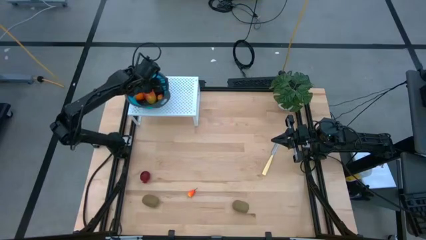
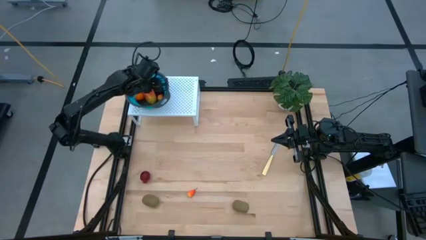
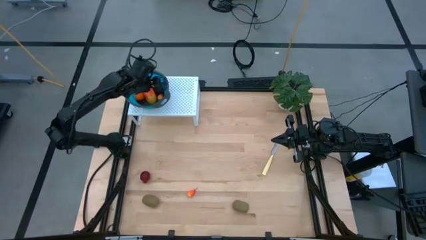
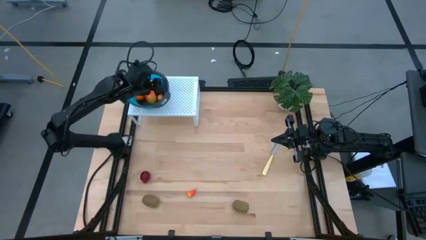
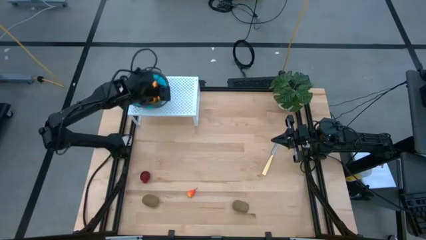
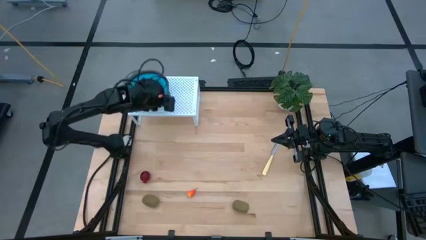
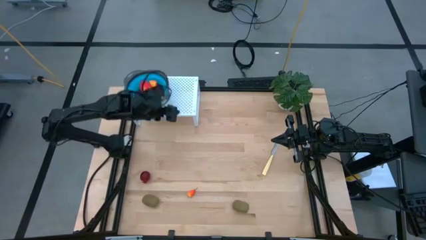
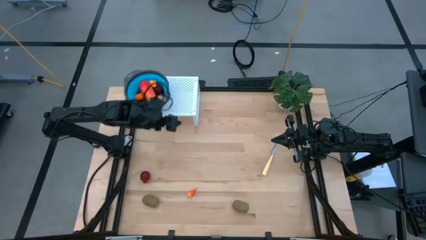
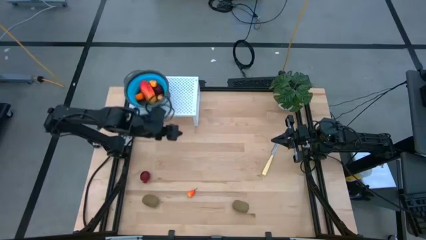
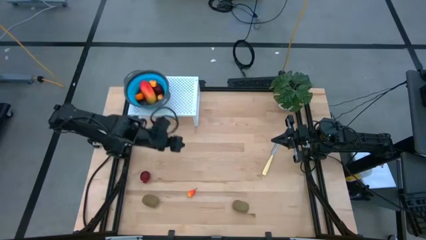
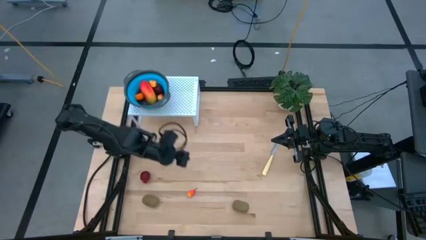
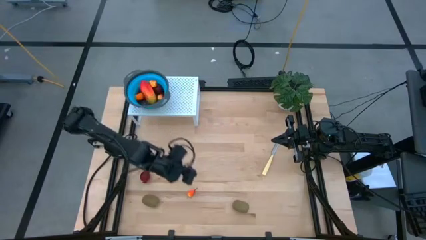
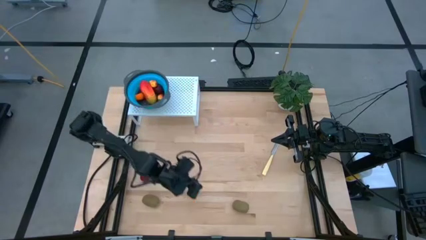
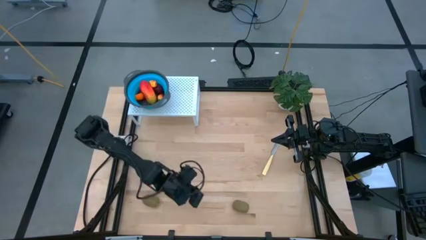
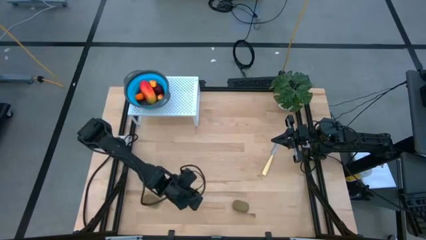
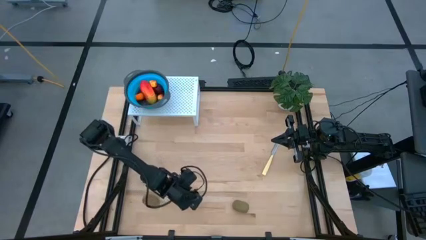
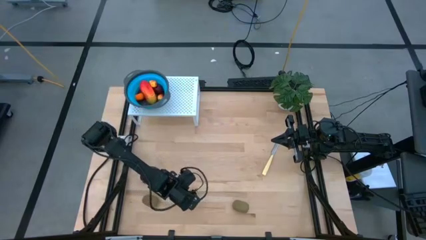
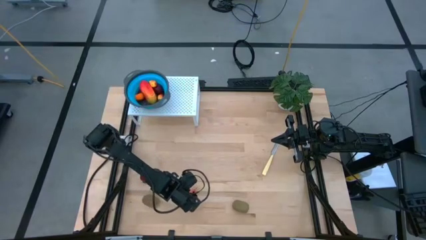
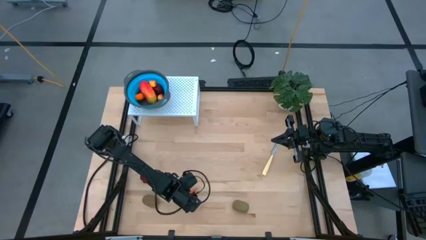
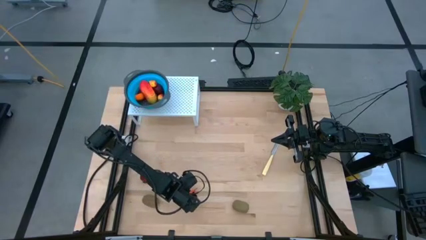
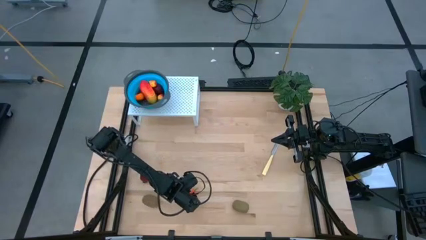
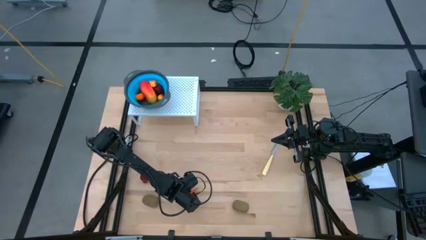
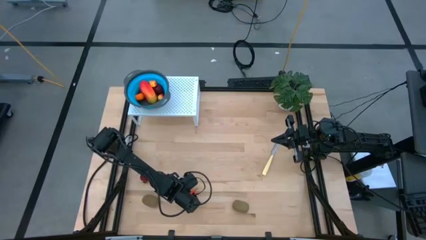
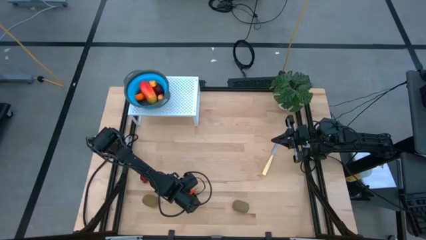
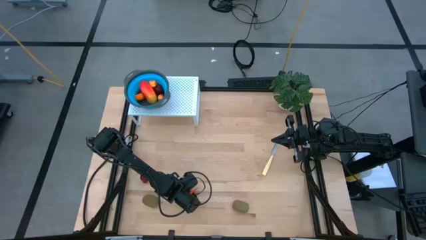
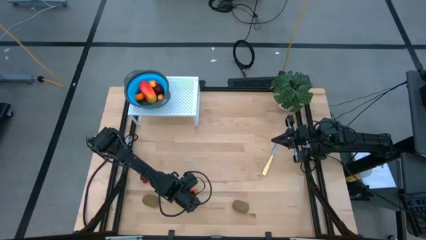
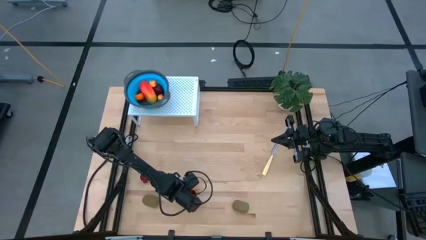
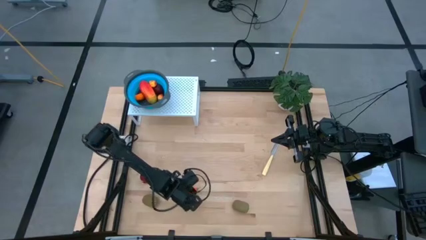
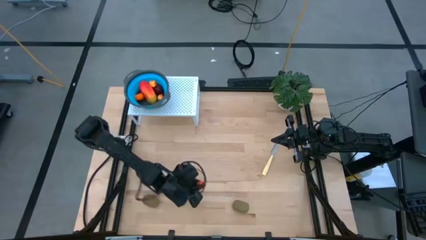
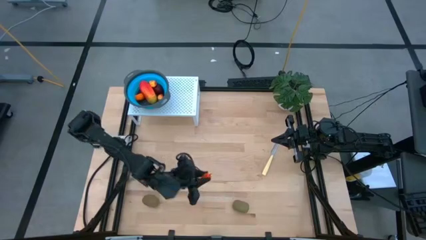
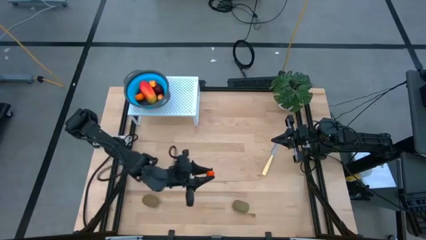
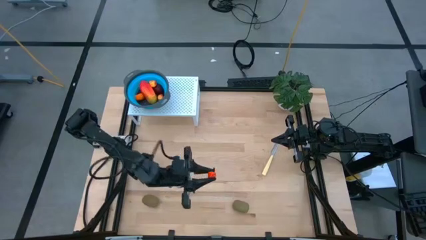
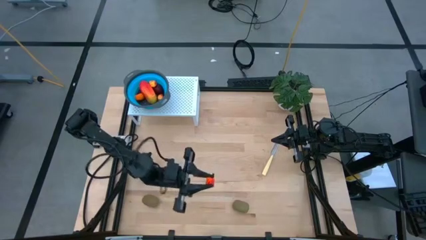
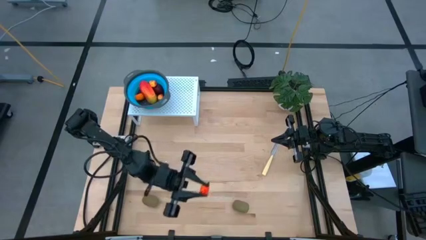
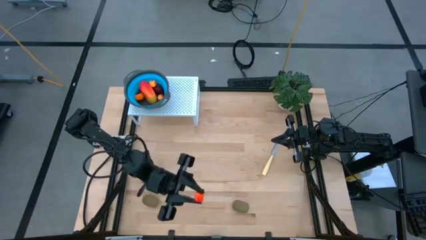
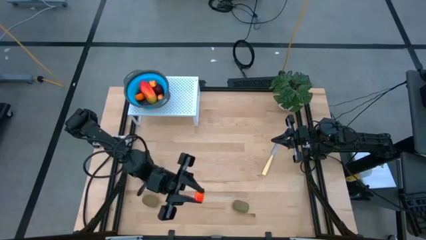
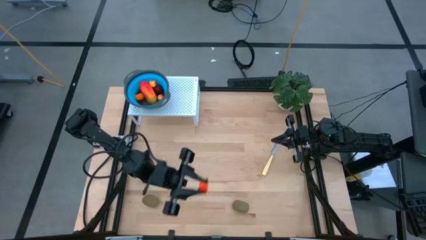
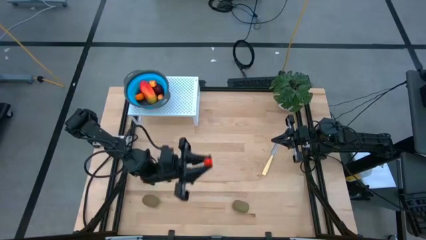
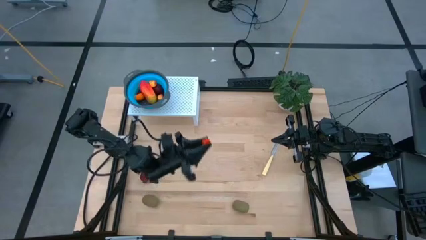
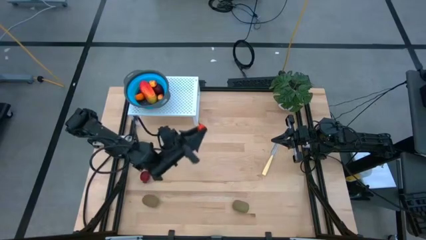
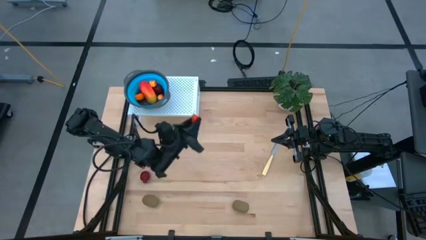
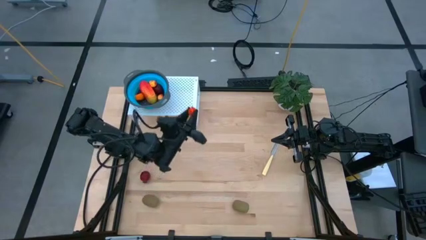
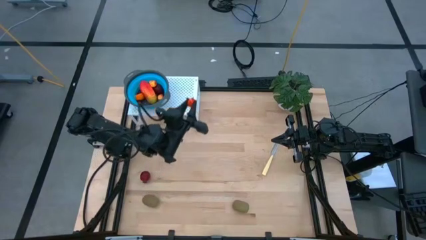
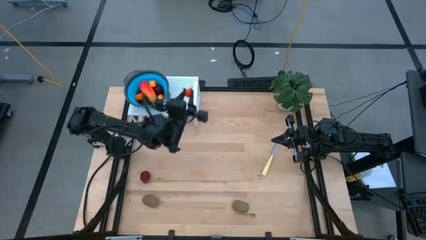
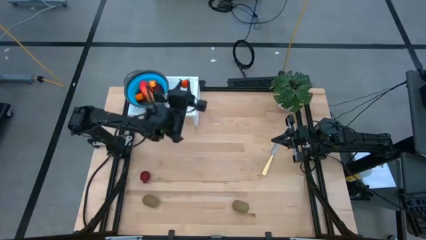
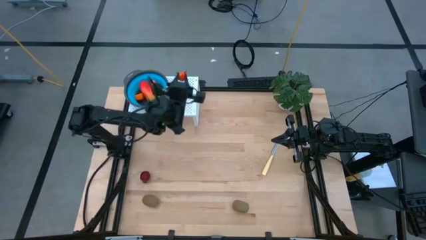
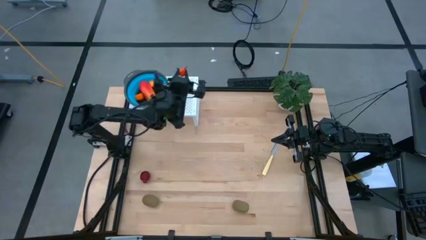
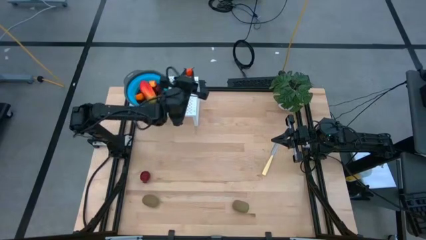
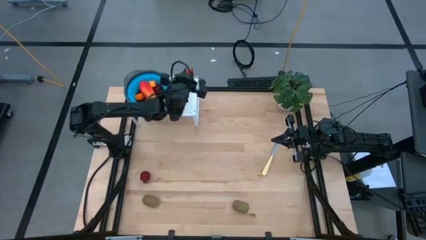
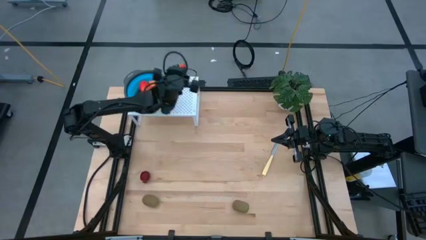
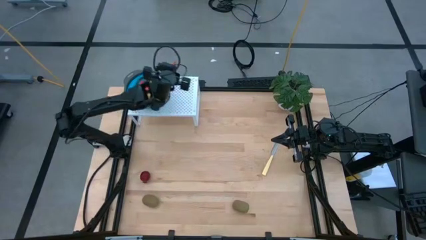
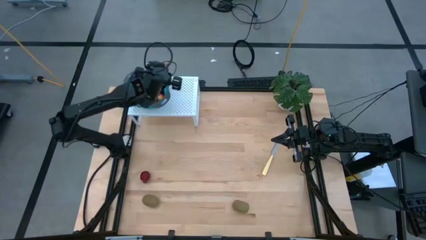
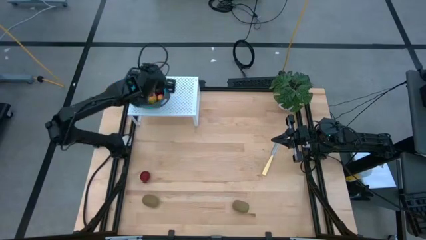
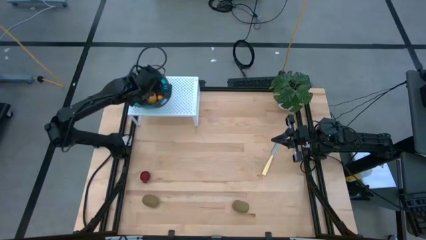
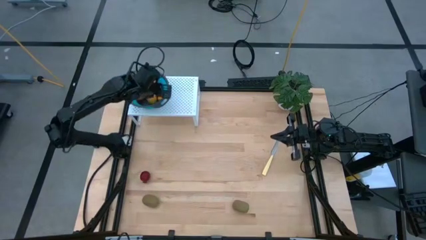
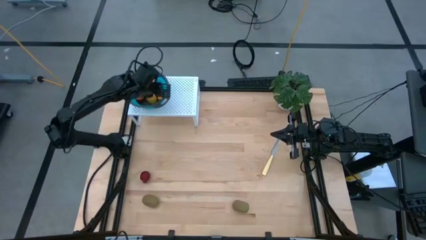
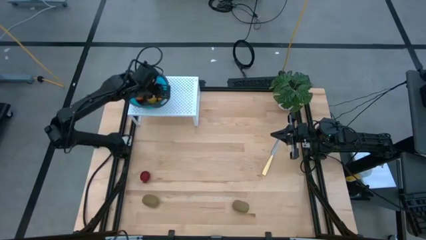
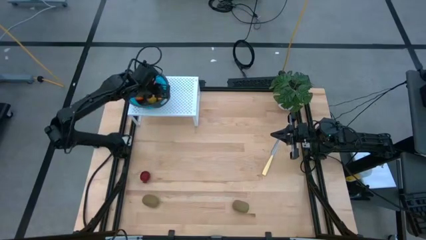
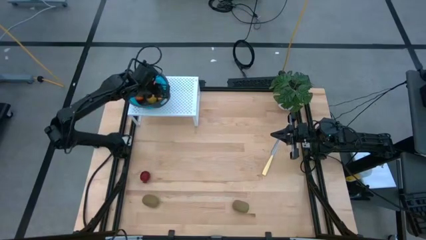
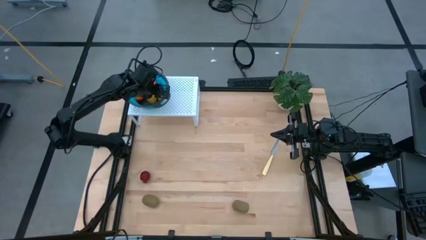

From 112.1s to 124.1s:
Task: Pick & Place Fruit
Put the peach into the blue strainer bowl on the shelf

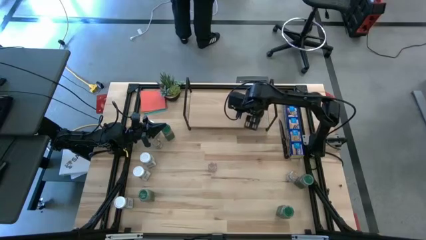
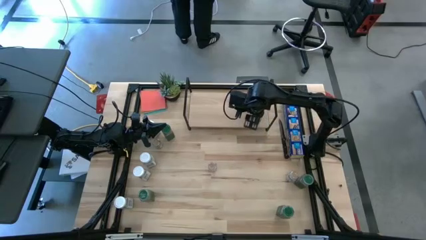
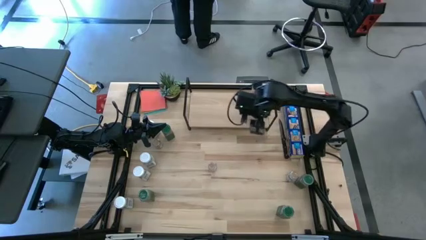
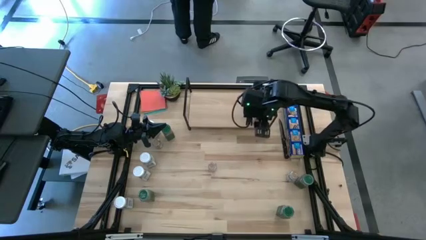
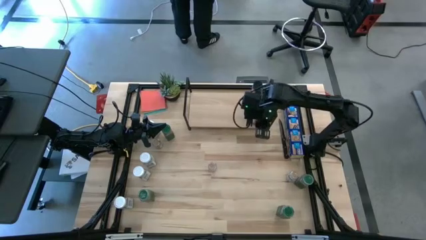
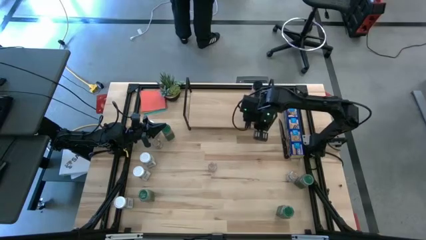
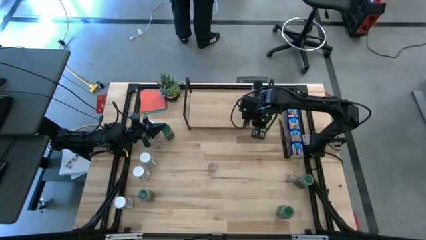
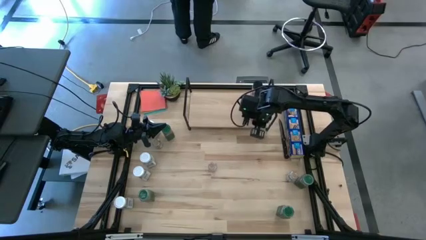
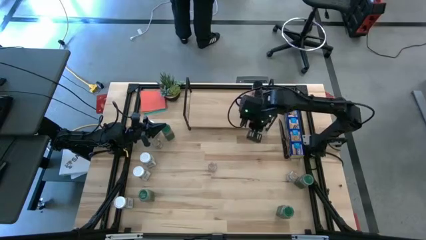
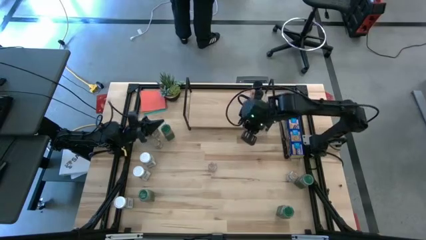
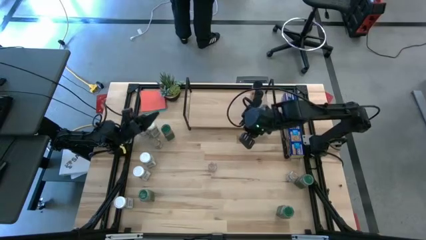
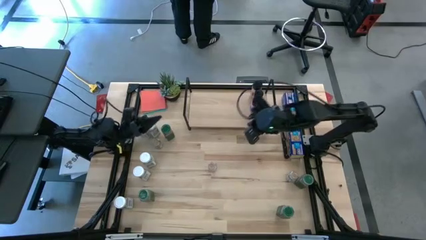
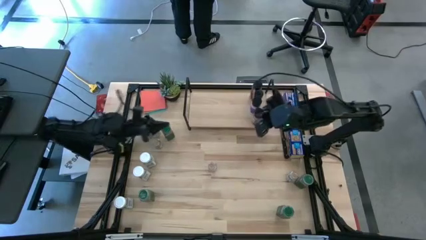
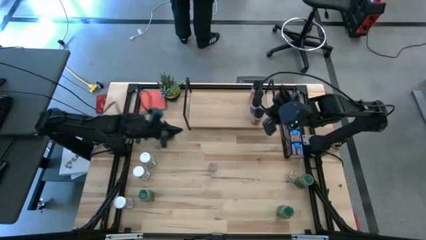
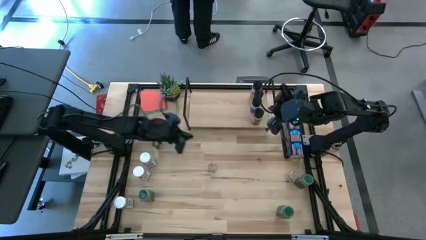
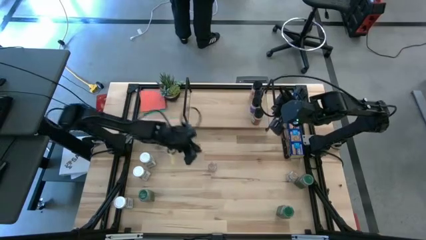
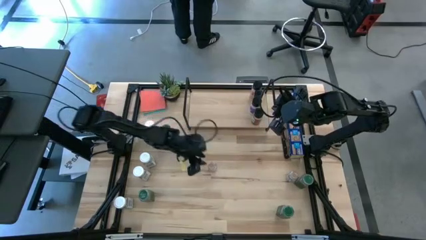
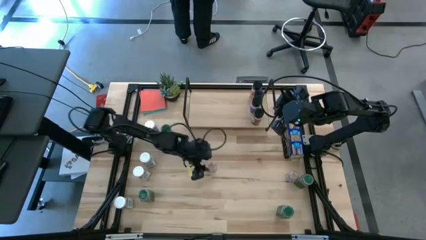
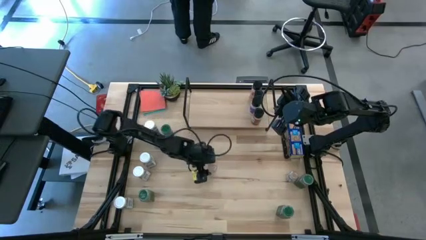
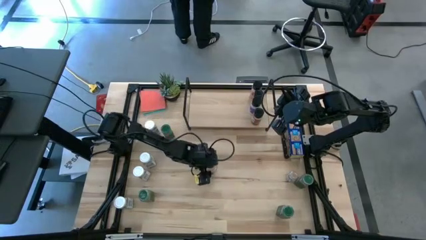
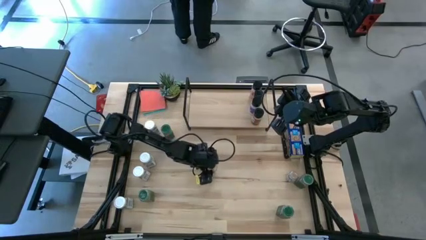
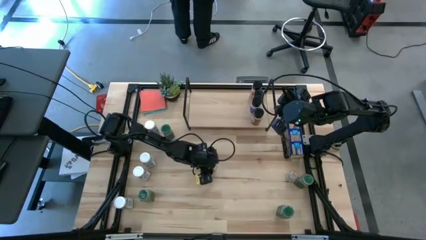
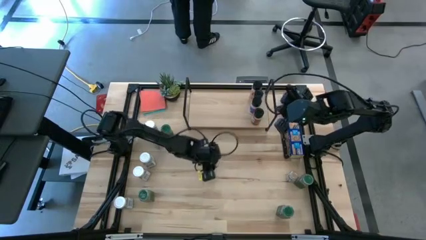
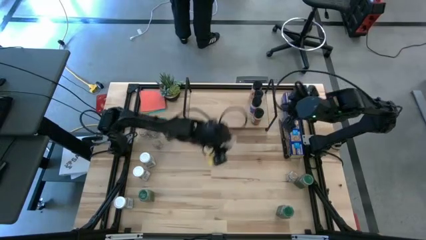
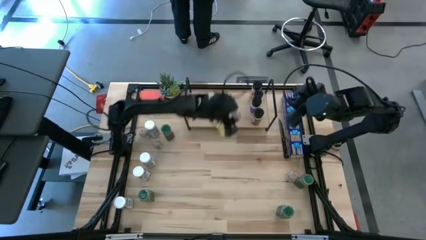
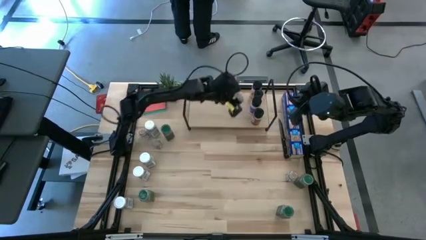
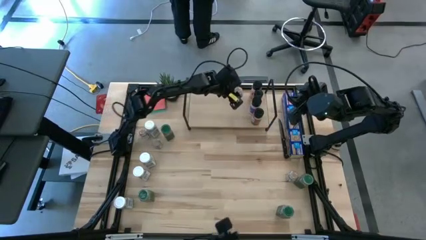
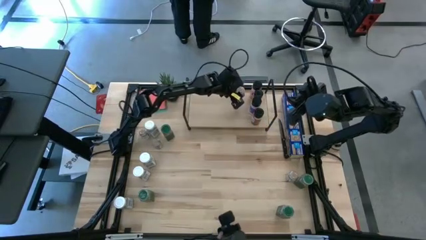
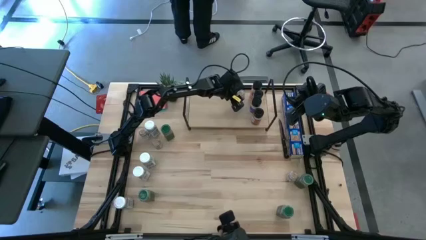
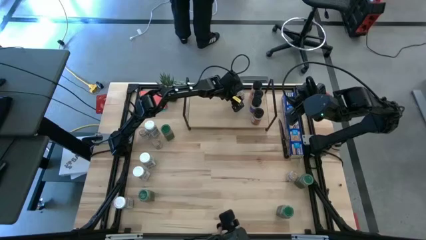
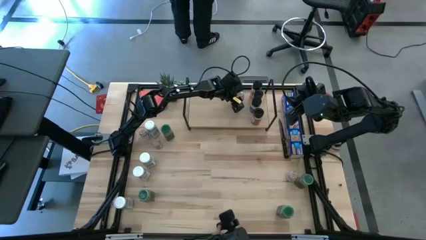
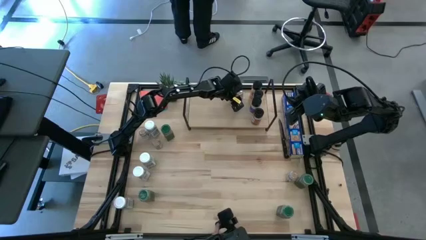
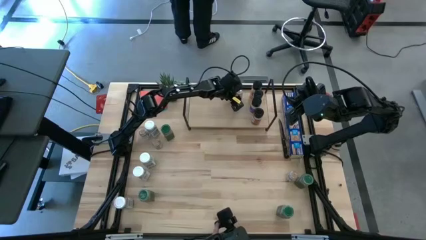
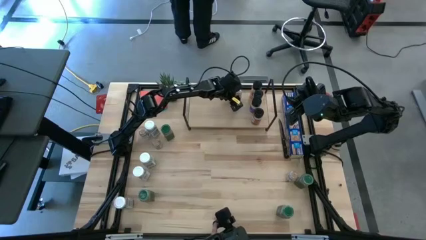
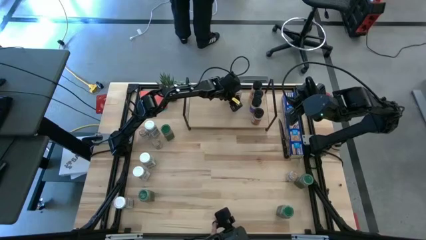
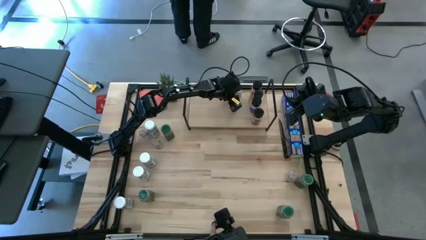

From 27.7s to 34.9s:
Task: Shelf spices
Put the brown seasoning bottle on the shelf
